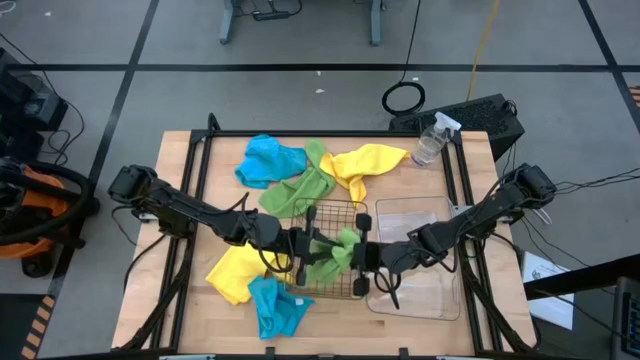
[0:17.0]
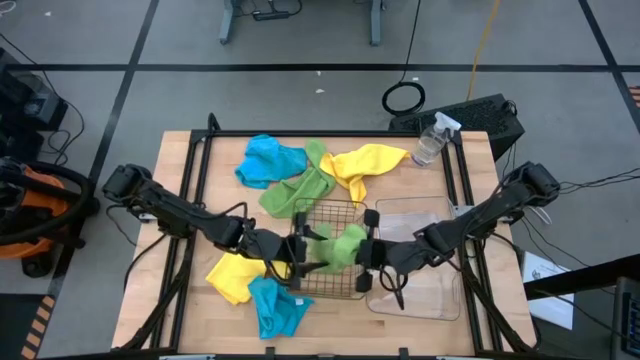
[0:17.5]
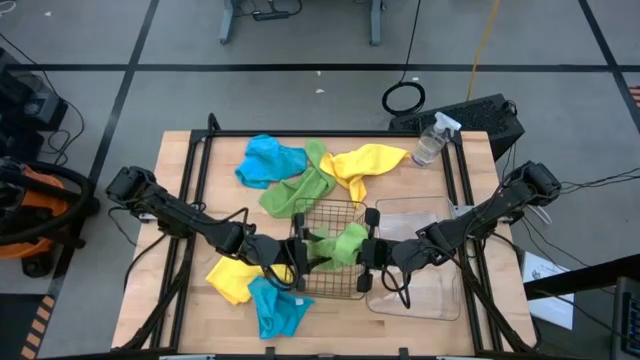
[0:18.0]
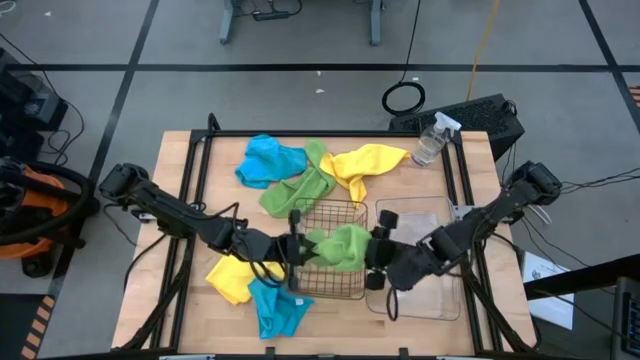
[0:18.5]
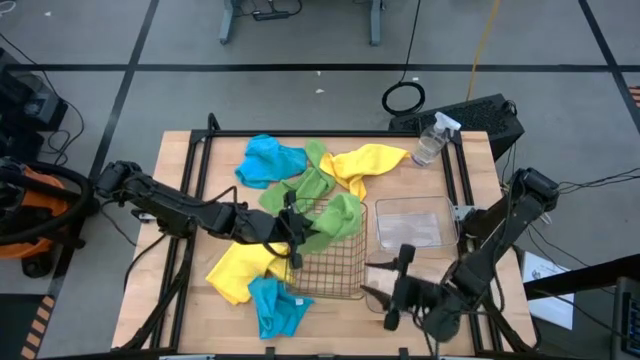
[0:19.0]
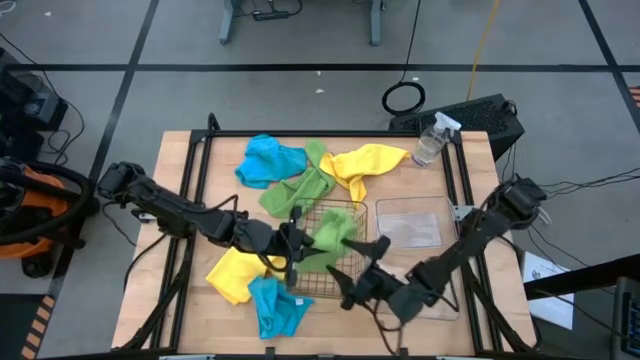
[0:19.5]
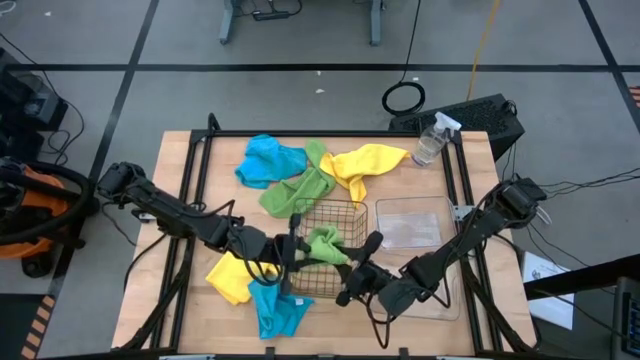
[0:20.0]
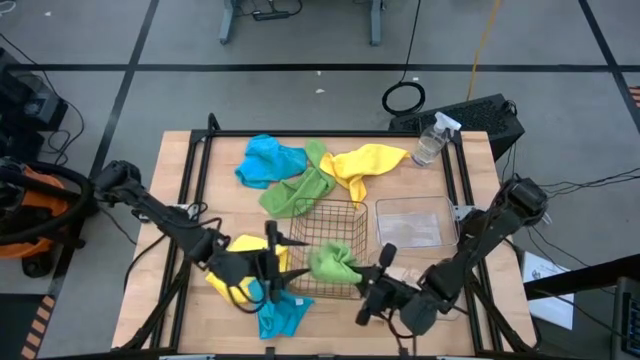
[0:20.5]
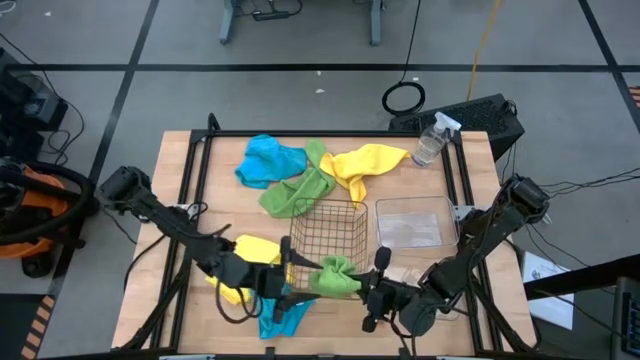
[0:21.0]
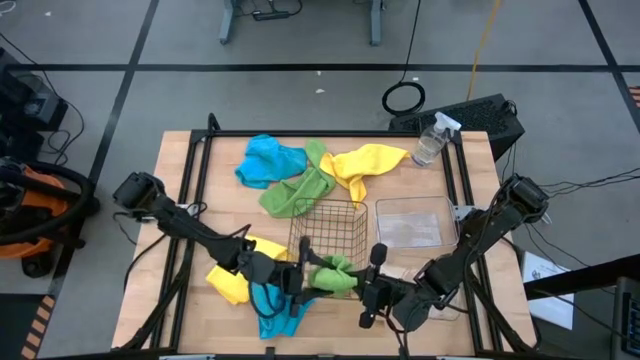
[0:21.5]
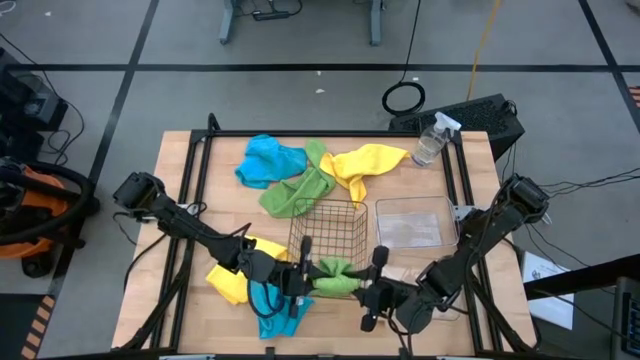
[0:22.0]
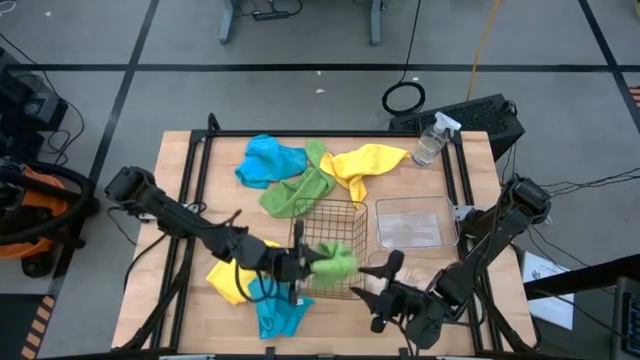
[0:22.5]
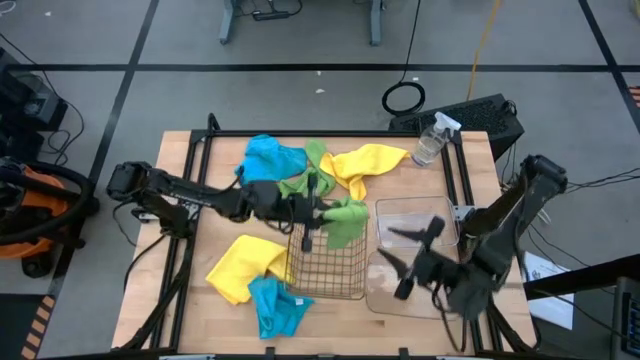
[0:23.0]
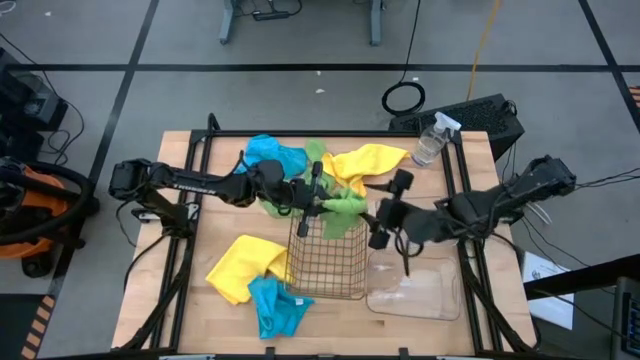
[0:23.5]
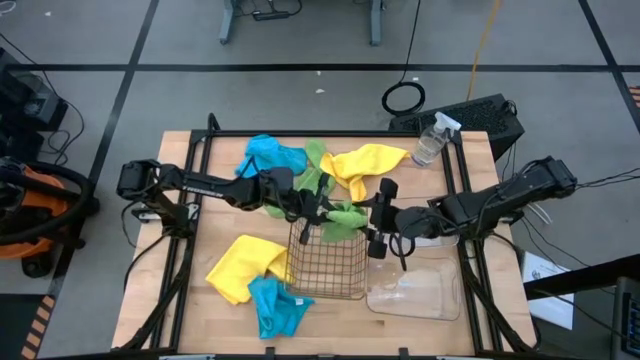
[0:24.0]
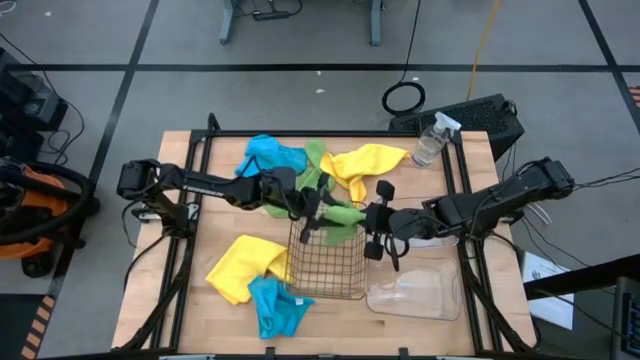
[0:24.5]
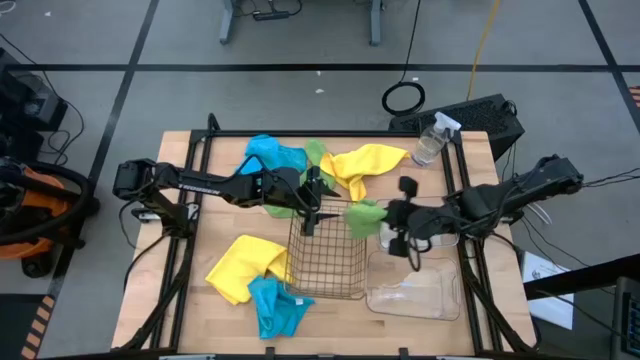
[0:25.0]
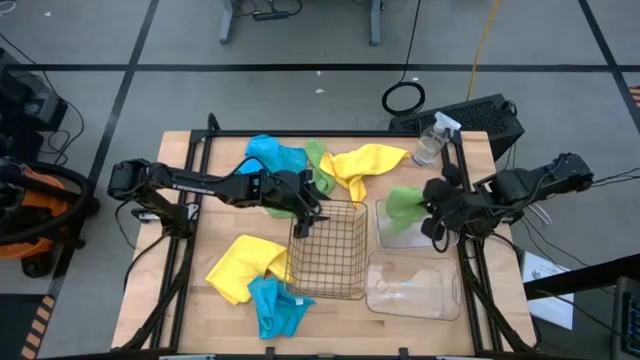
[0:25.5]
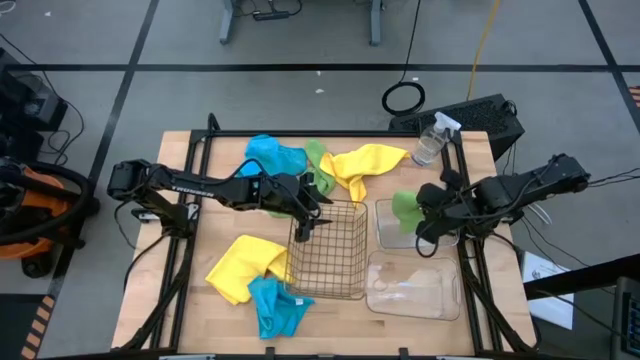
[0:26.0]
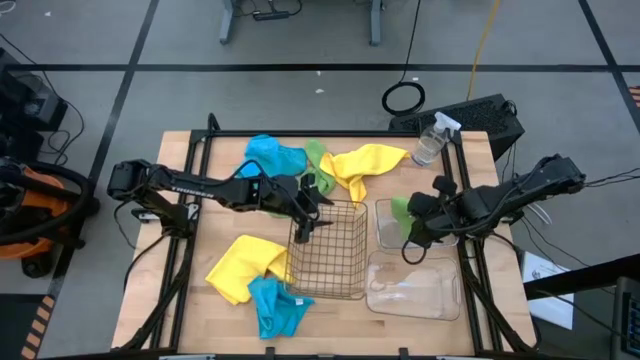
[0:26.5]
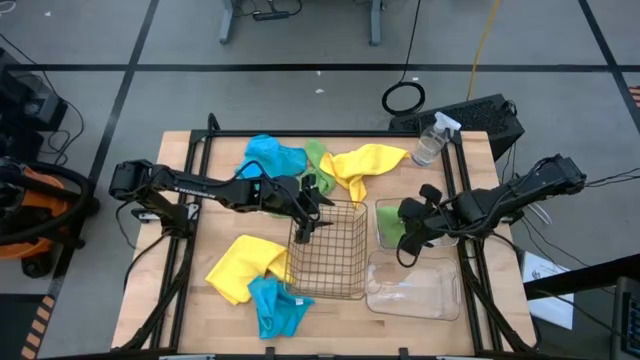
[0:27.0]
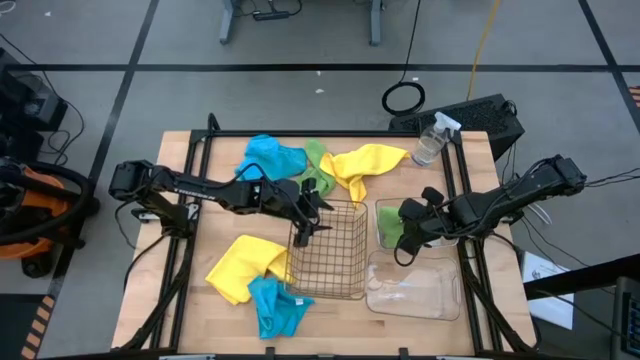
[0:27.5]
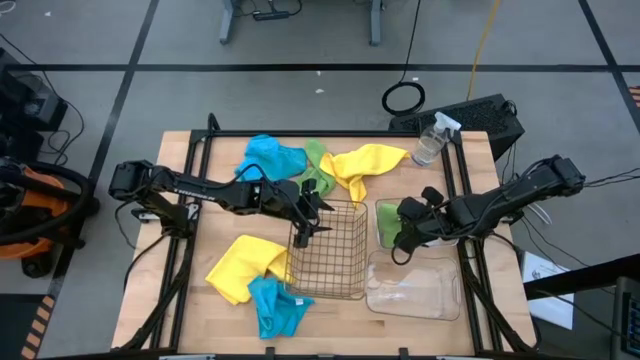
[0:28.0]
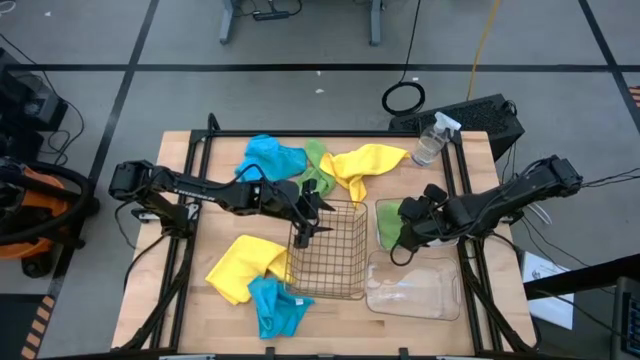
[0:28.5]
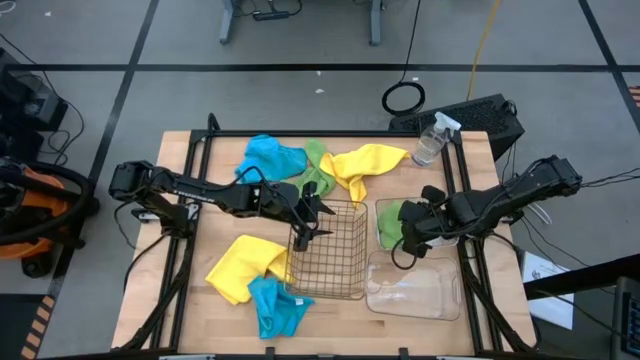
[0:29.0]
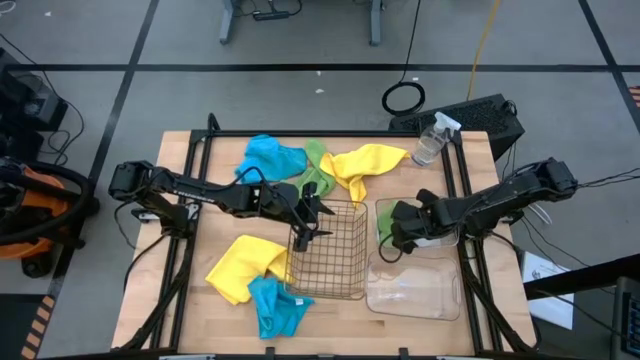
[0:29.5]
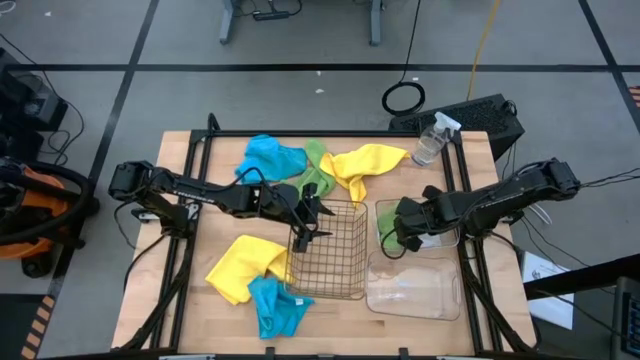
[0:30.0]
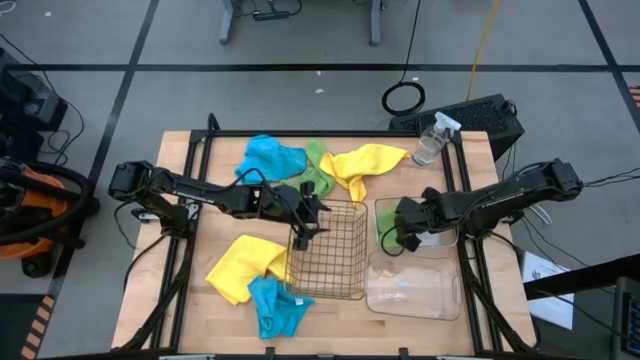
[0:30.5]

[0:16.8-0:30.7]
Task: Sort microfiber towel by color & place in baskets
Put the left green microfiber cloth into the top transparent bin

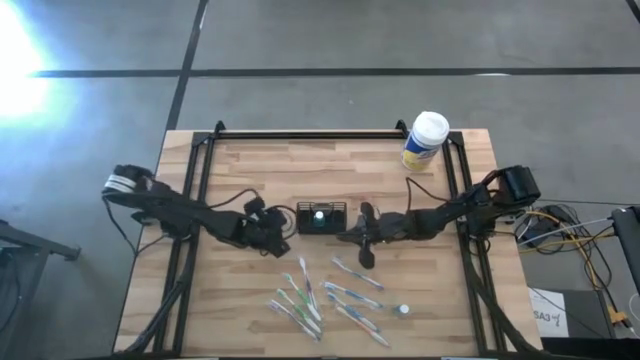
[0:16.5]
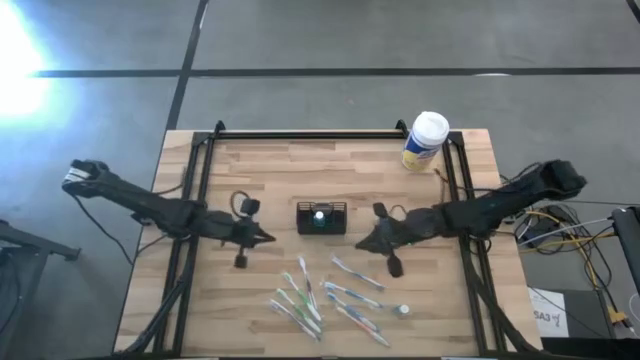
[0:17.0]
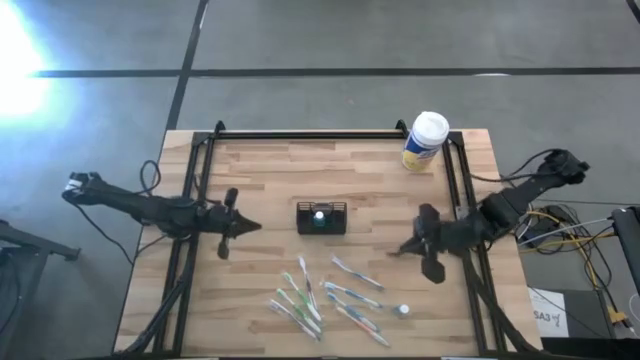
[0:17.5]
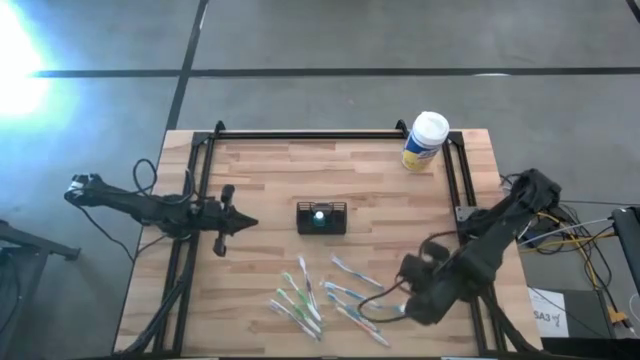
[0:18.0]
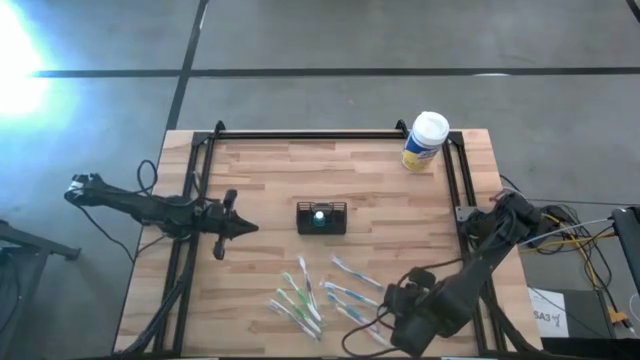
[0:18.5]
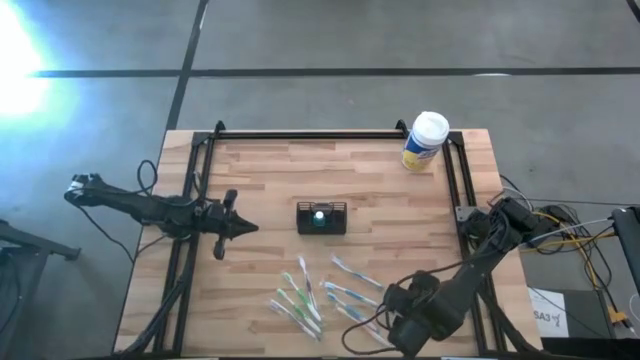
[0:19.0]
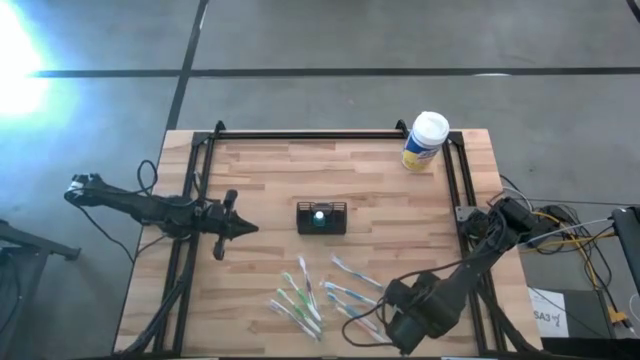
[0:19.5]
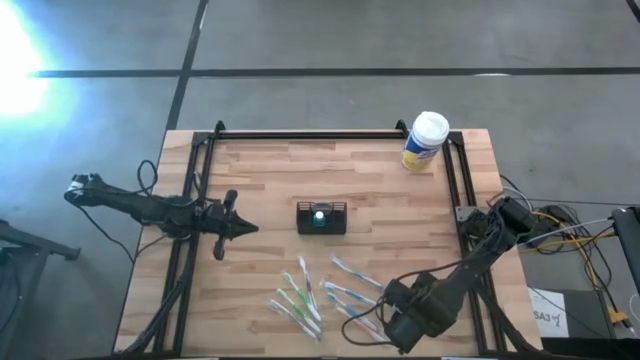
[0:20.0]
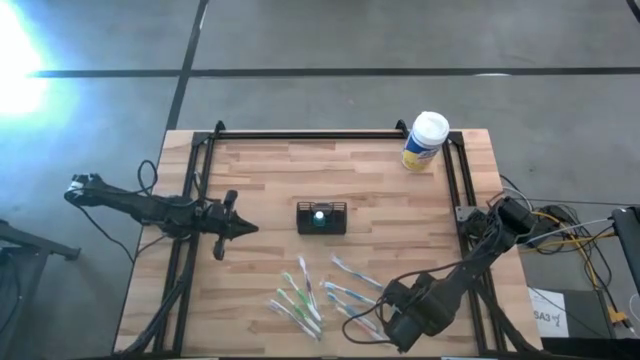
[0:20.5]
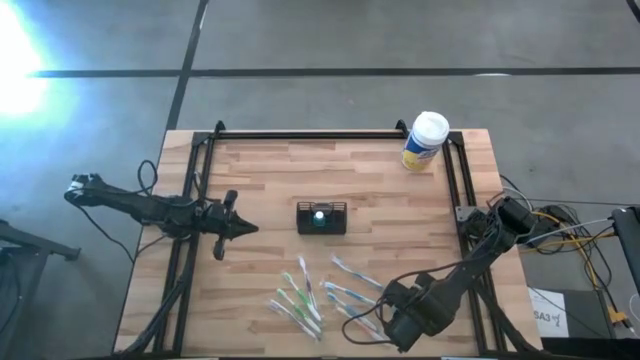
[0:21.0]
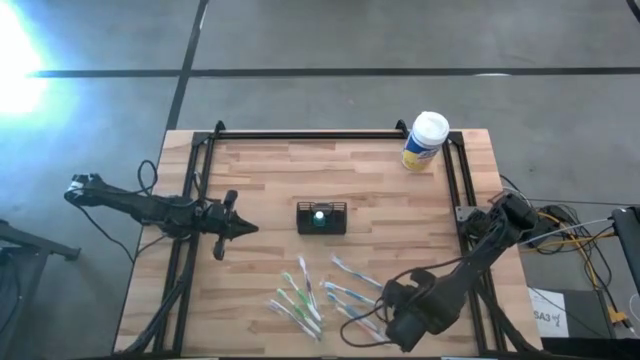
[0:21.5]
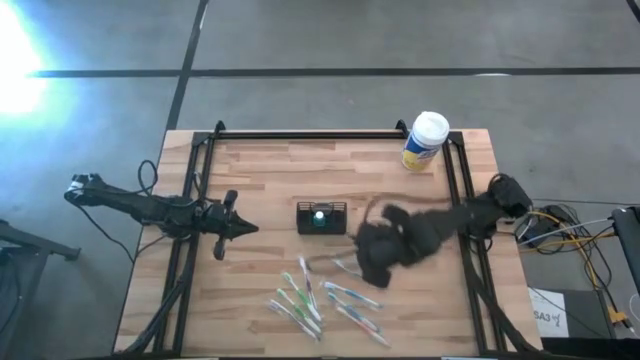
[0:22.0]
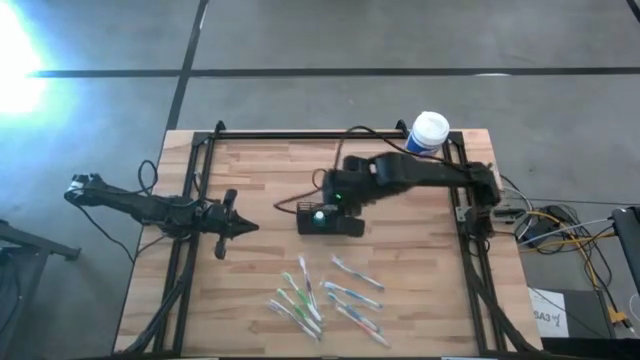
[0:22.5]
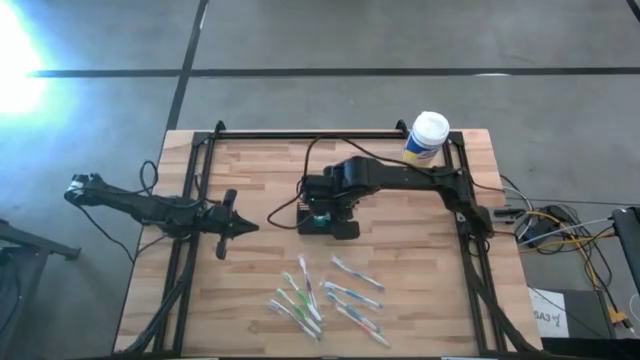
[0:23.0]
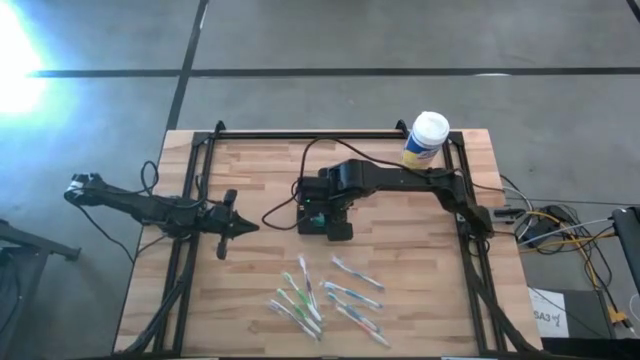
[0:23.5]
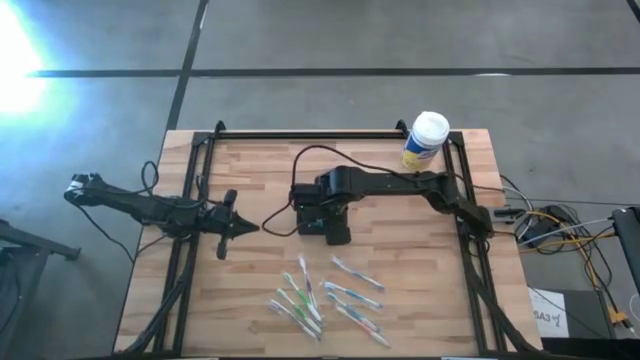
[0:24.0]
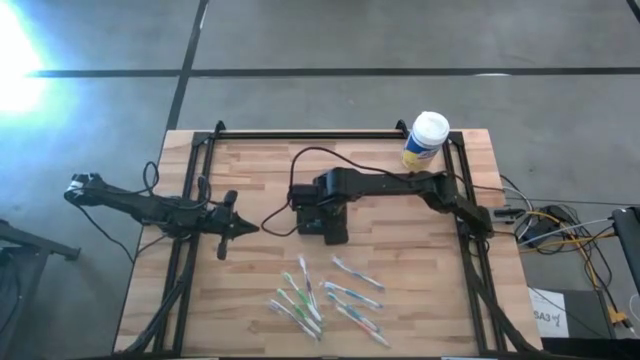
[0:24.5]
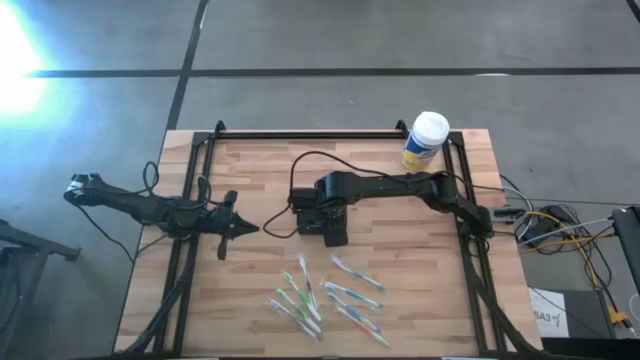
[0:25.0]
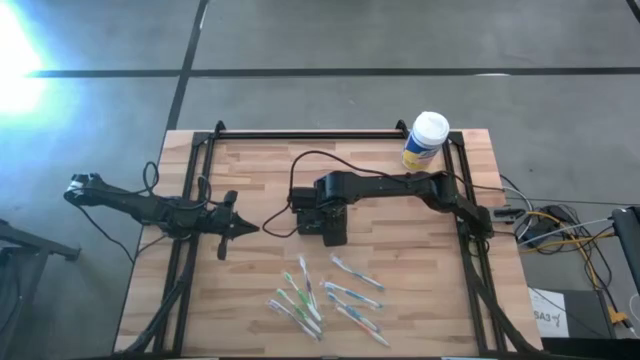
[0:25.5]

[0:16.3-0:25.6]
Task: Pick & Place toothbrushing station
Put the blue mouthwash into the black mesh organizer
